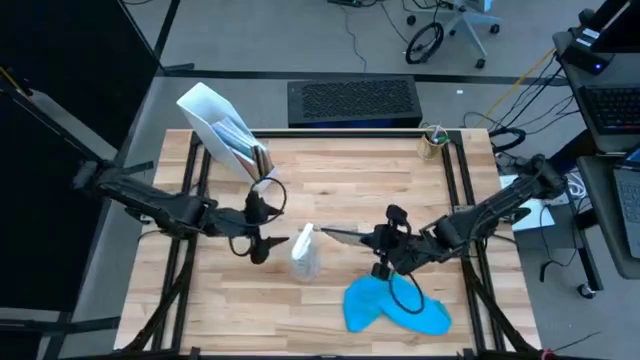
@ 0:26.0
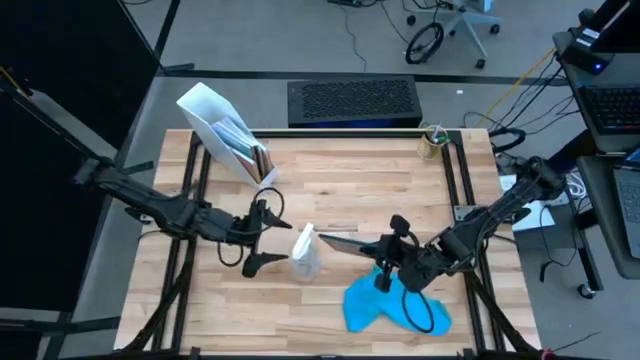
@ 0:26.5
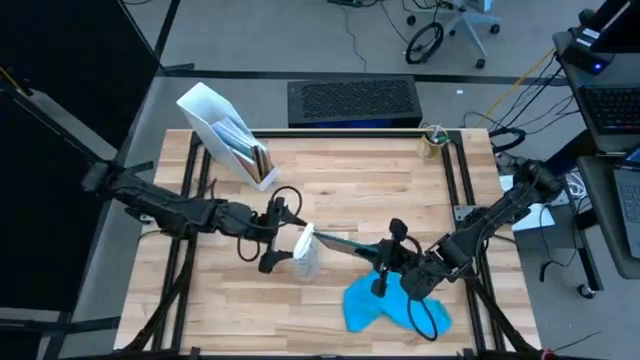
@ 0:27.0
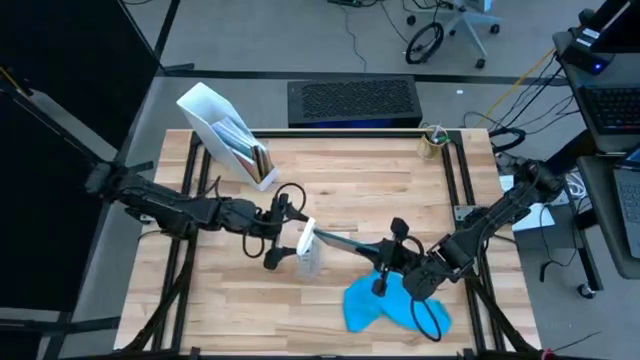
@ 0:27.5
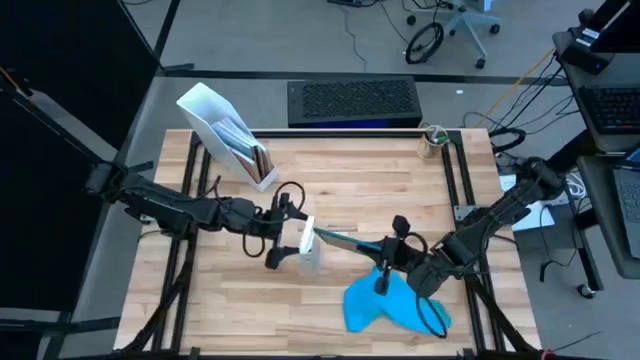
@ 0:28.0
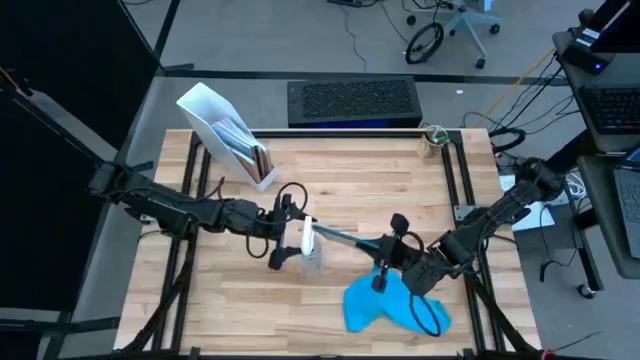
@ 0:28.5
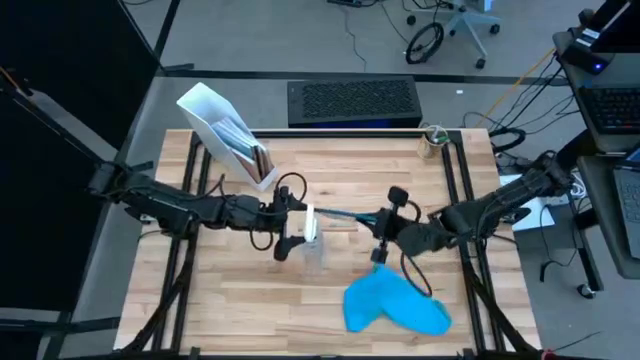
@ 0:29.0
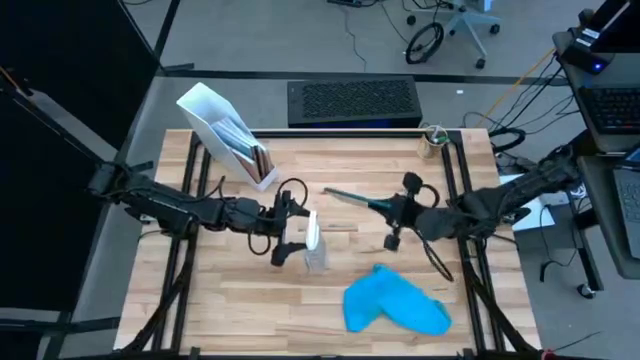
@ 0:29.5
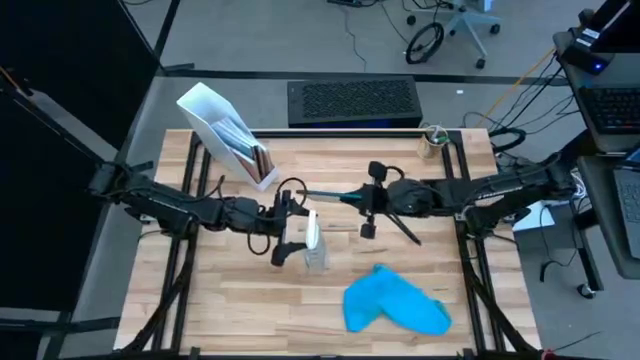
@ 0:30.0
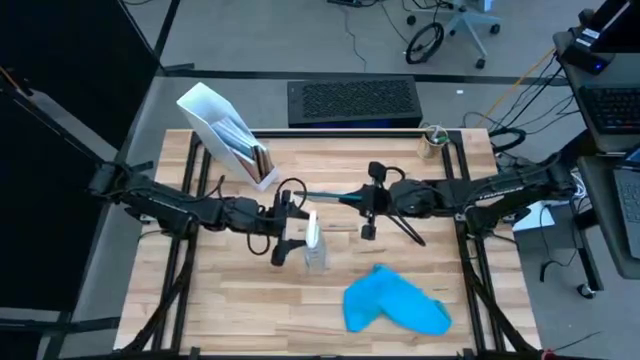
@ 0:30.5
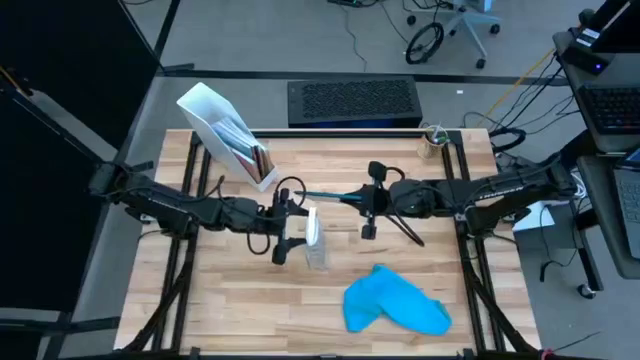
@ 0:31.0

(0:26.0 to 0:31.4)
Task: Apply microfiber cloth
Spray the front of the tablet with the spray cleaning bottle

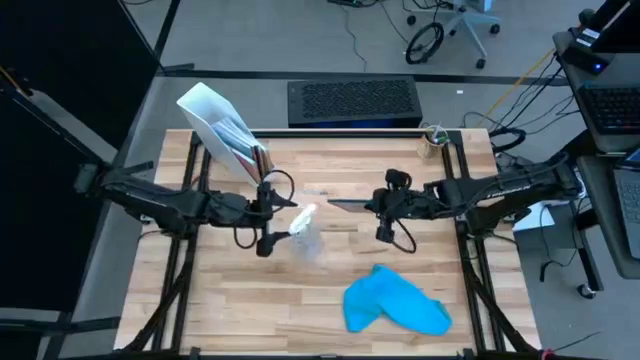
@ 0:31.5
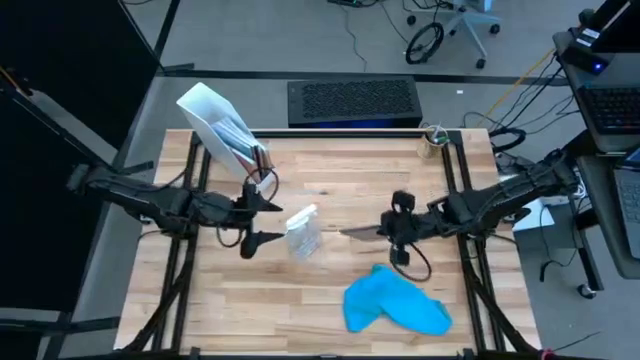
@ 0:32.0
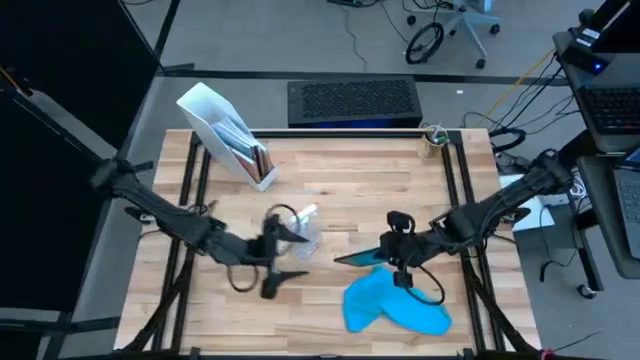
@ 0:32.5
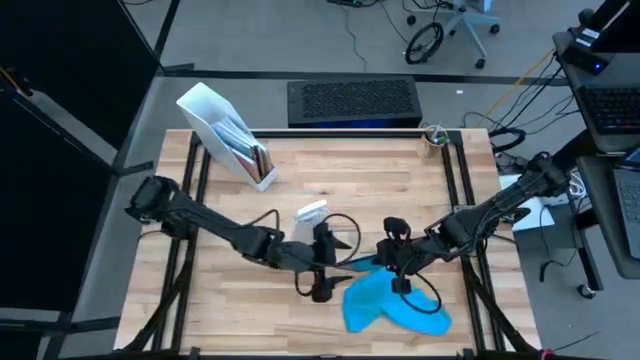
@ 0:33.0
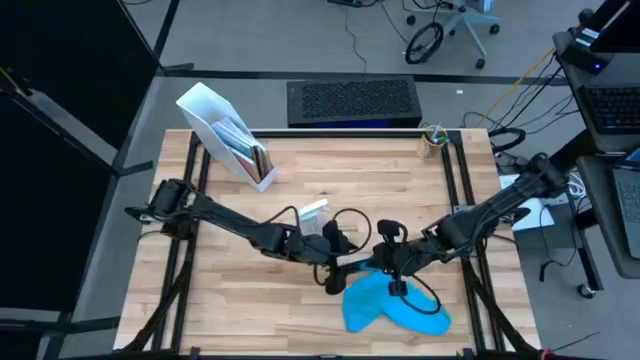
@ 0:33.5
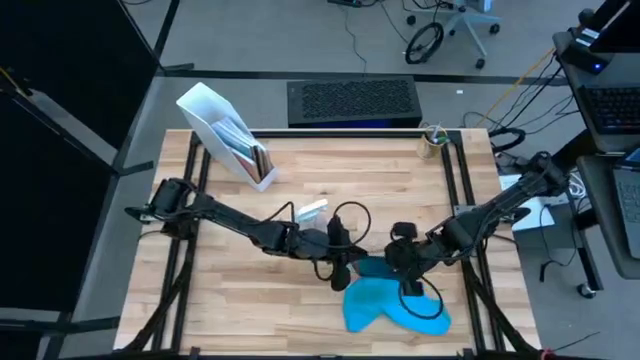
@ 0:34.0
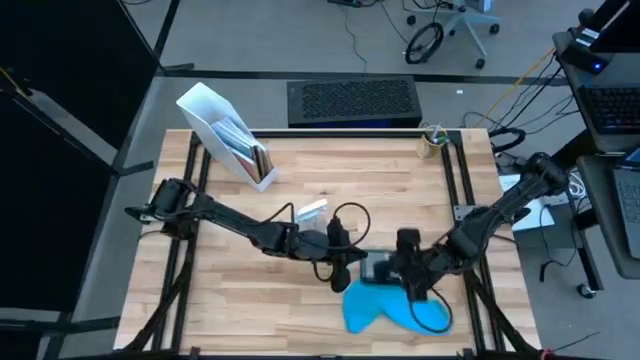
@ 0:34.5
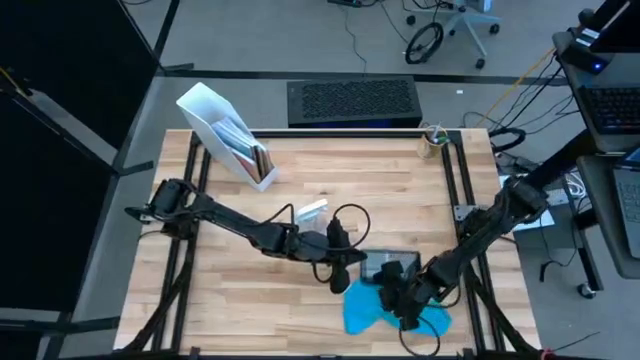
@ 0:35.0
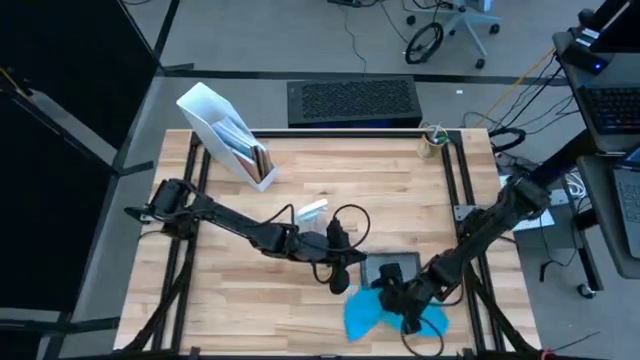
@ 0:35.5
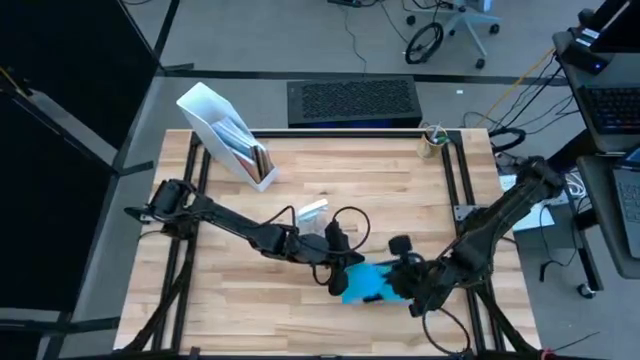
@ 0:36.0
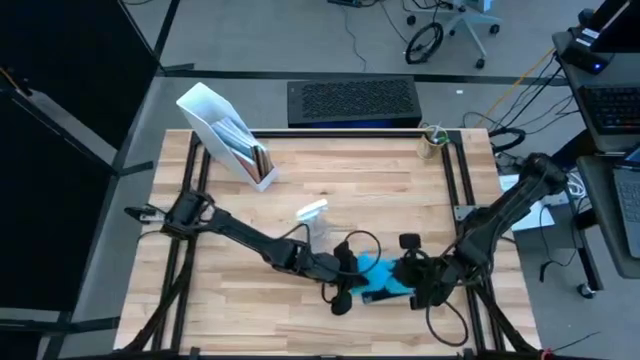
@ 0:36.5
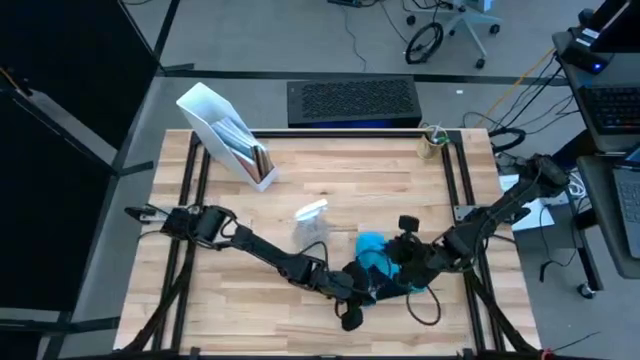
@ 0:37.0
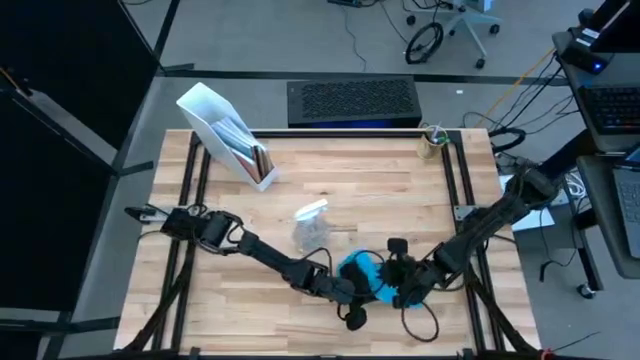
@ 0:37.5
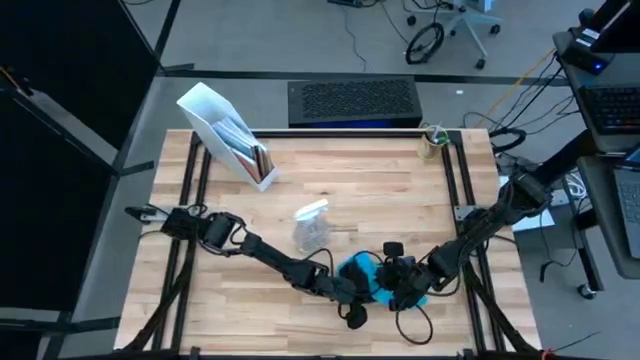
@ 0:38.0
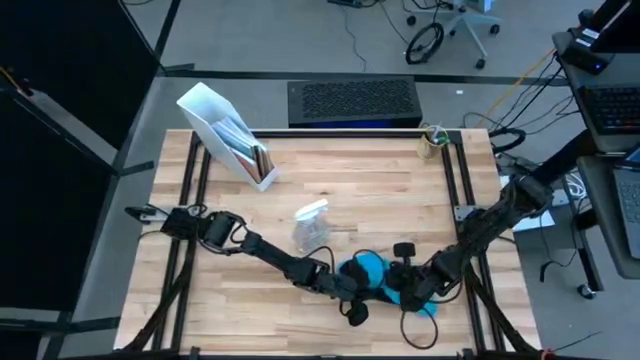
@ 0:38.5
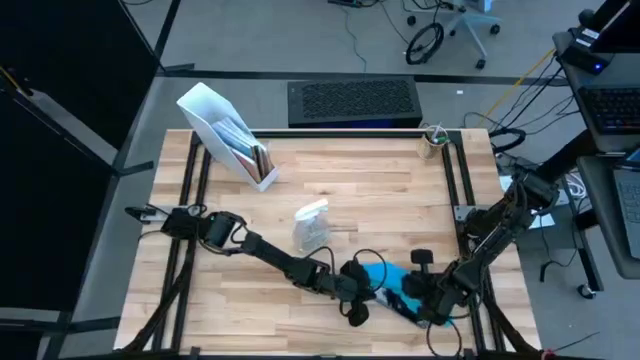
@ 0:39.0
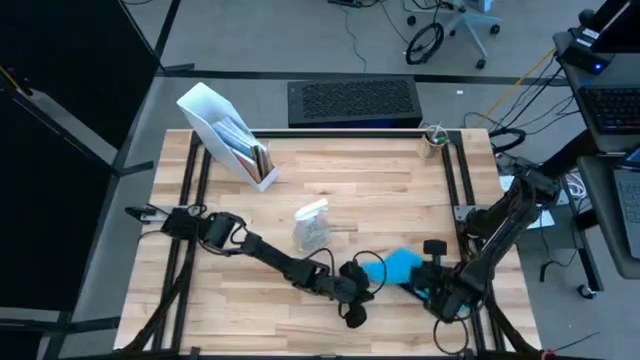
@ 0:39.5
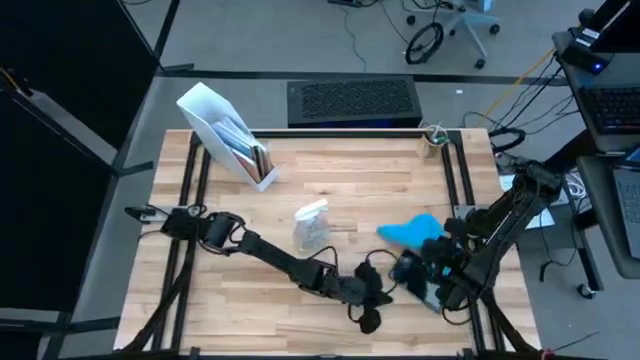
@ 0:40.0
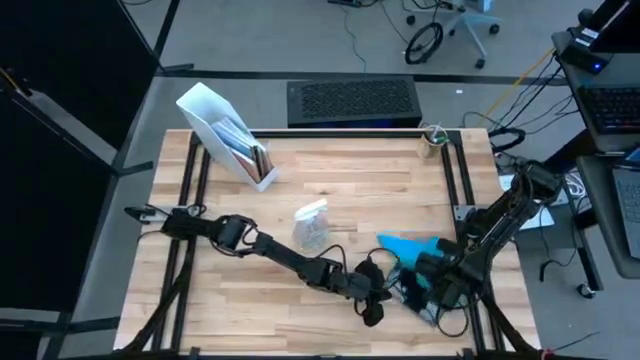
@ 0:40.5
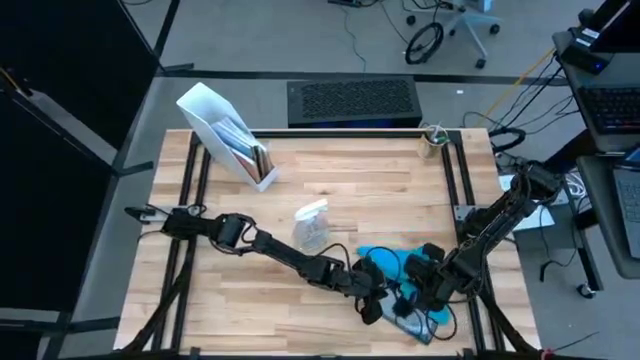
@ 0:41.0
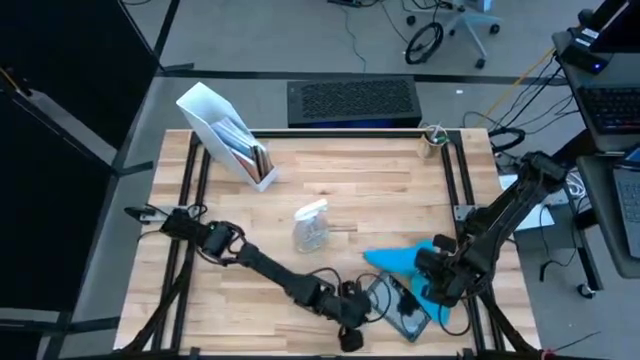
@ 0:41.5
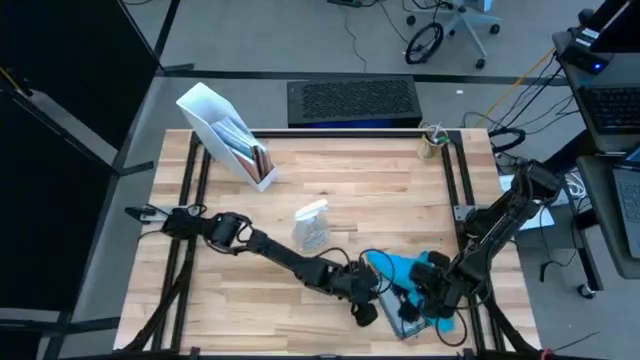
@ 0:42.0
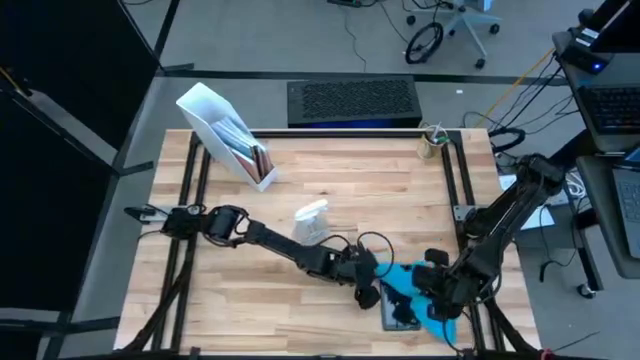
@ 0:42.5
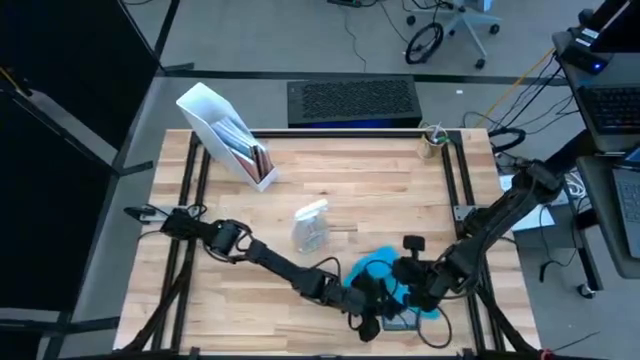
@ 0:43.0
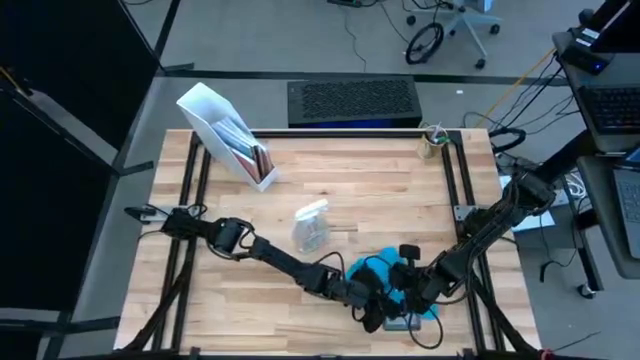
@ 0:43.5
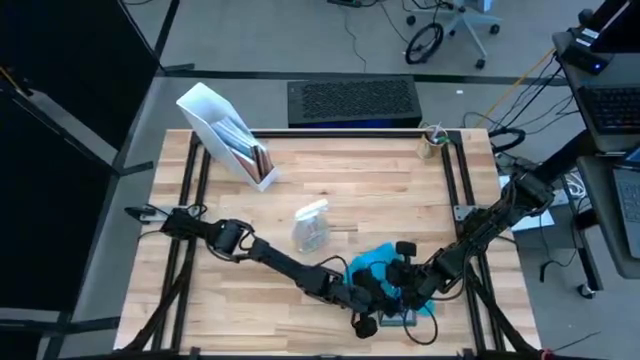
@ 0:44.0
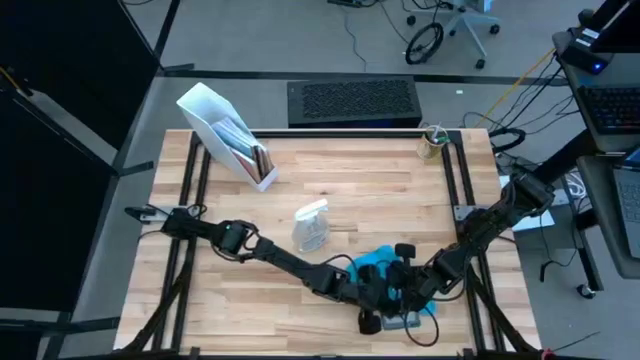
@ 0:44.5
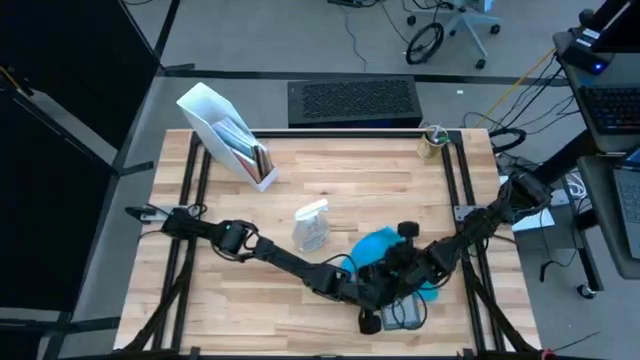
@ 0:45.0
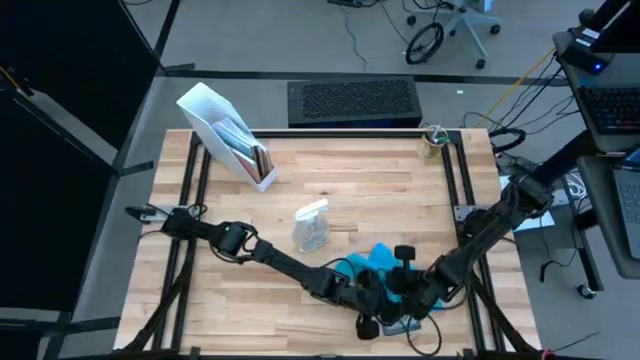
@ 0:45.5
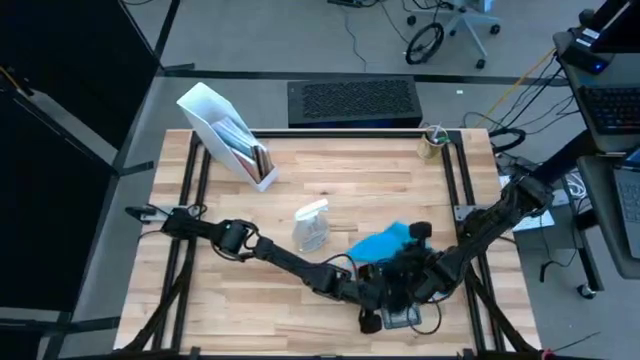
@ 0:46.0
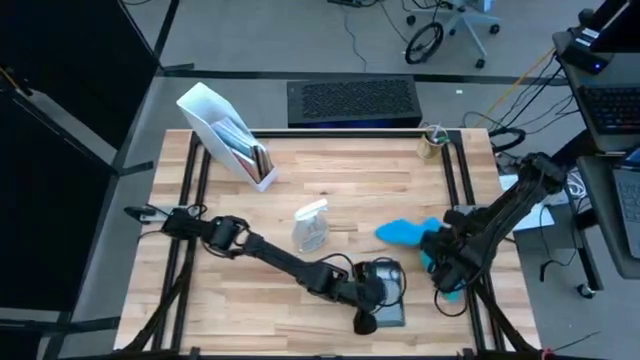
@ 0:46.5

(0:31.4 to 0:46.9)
Wipe the front of the tablet with the blue microfiber cloth
